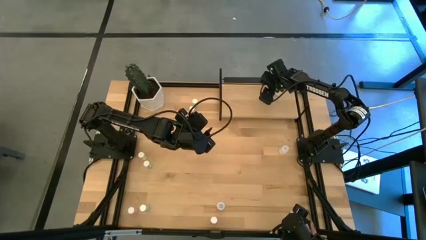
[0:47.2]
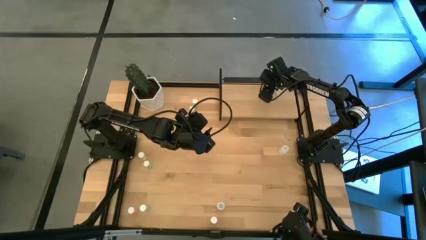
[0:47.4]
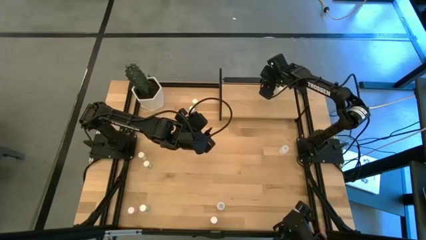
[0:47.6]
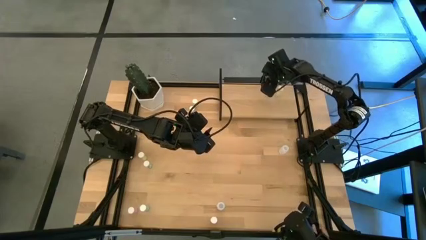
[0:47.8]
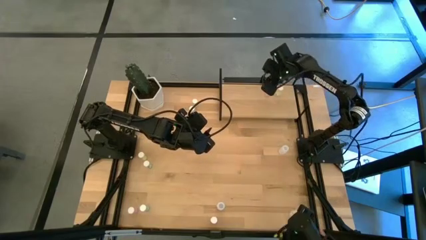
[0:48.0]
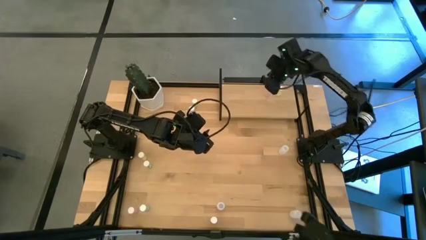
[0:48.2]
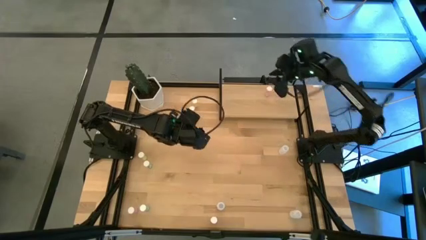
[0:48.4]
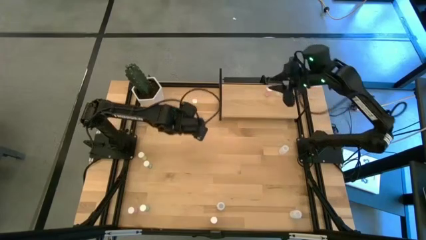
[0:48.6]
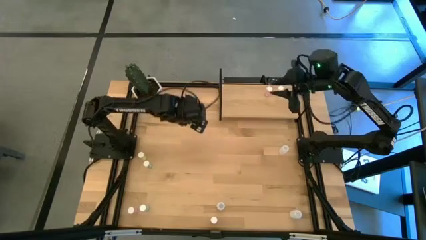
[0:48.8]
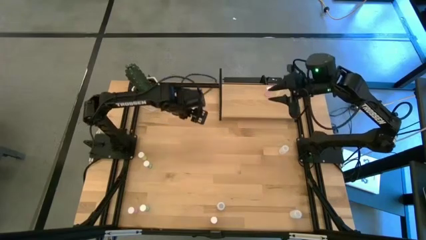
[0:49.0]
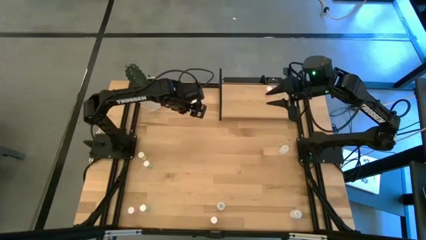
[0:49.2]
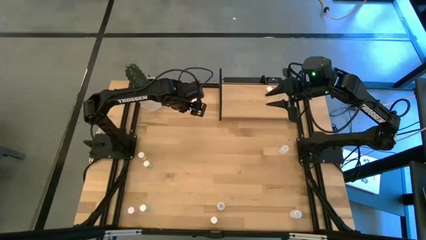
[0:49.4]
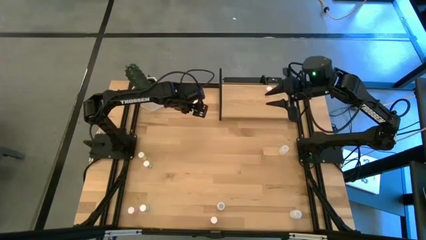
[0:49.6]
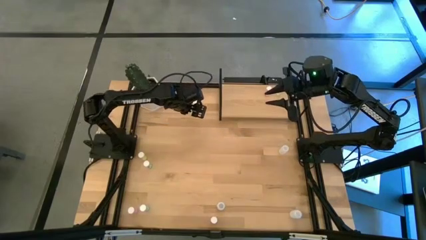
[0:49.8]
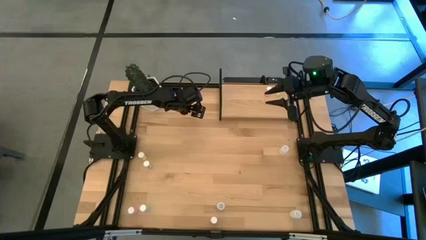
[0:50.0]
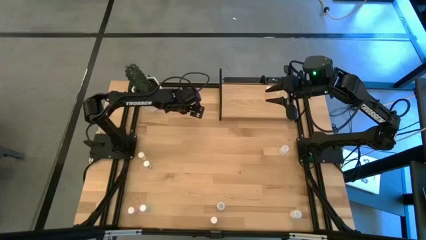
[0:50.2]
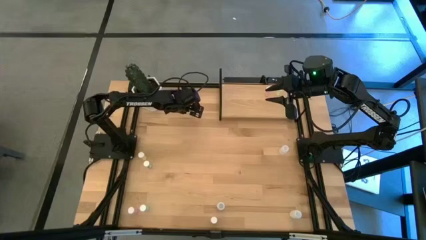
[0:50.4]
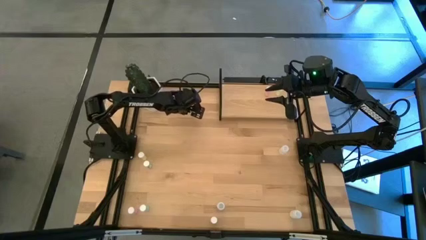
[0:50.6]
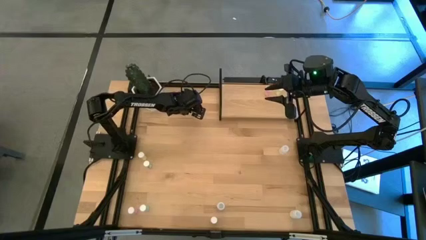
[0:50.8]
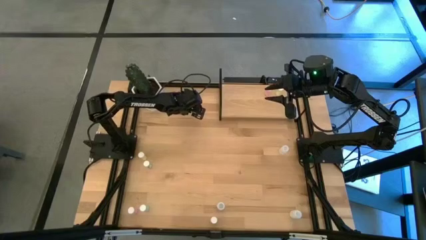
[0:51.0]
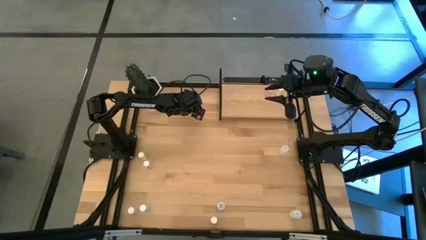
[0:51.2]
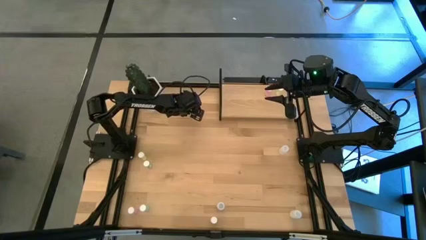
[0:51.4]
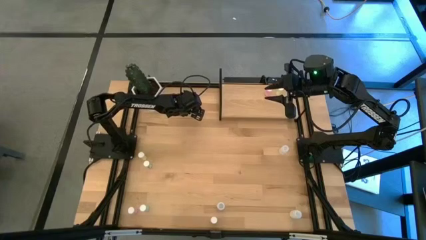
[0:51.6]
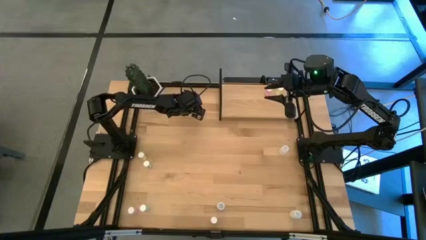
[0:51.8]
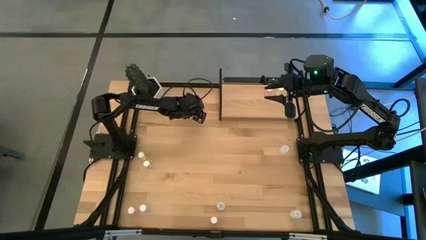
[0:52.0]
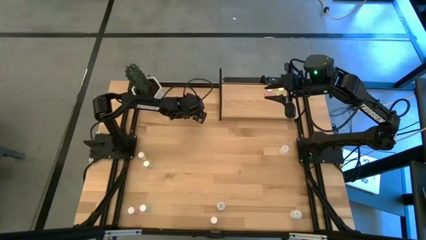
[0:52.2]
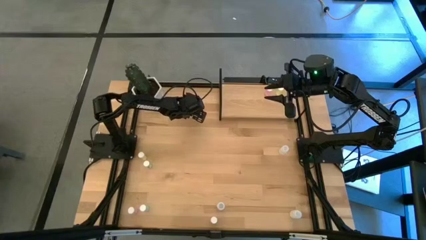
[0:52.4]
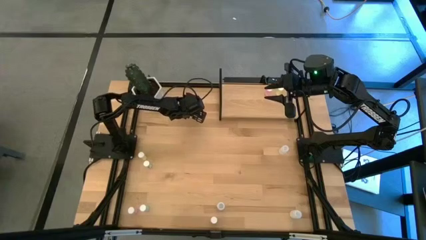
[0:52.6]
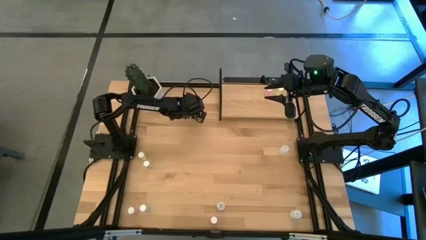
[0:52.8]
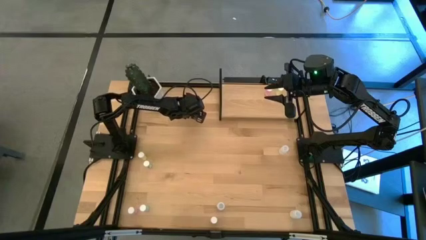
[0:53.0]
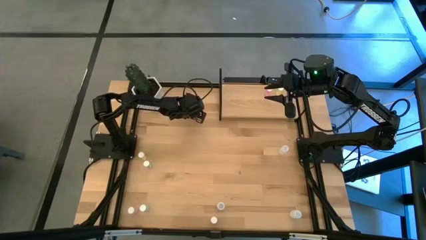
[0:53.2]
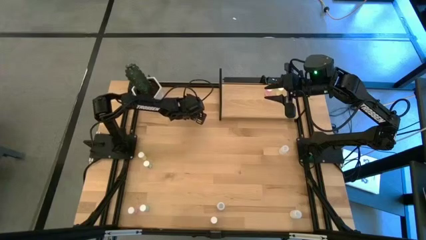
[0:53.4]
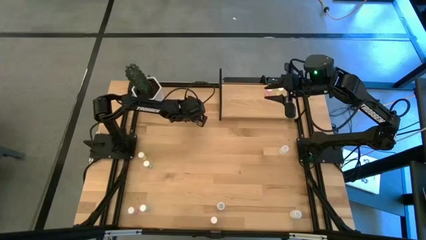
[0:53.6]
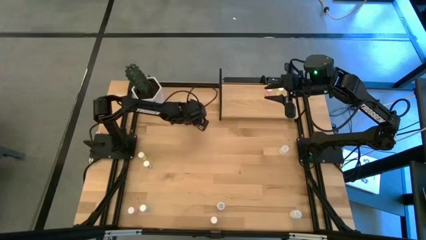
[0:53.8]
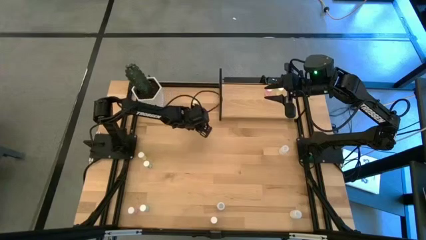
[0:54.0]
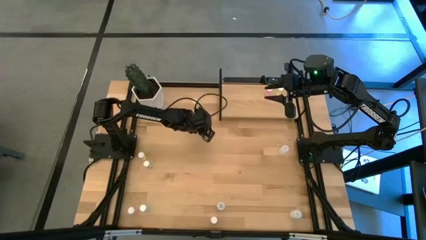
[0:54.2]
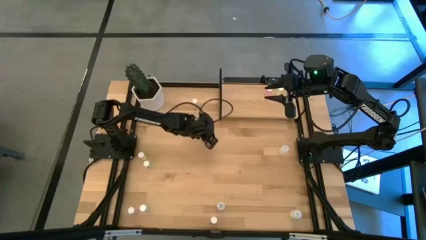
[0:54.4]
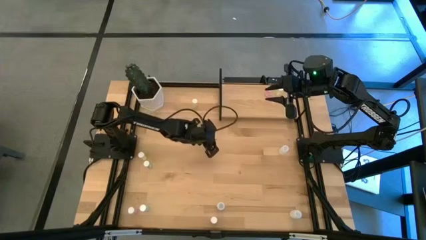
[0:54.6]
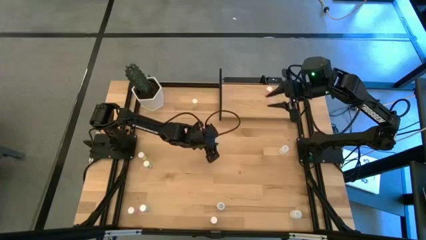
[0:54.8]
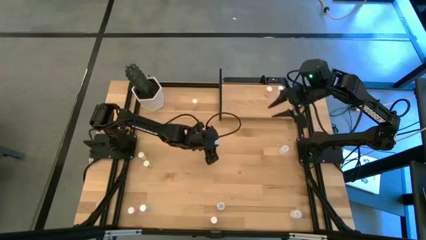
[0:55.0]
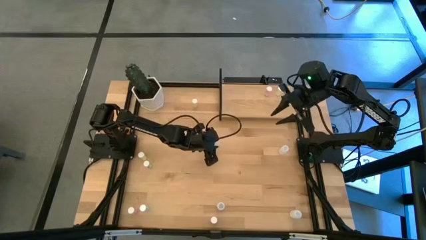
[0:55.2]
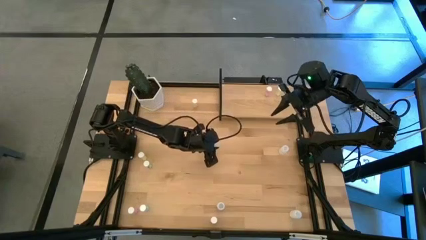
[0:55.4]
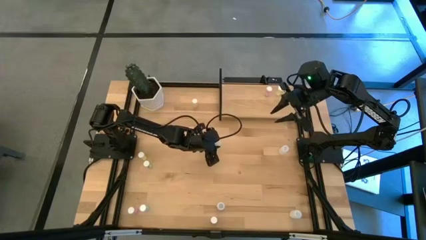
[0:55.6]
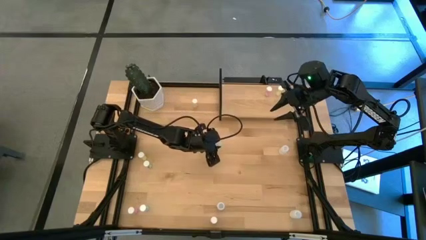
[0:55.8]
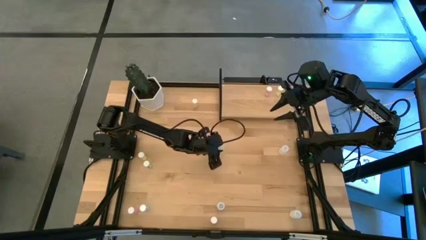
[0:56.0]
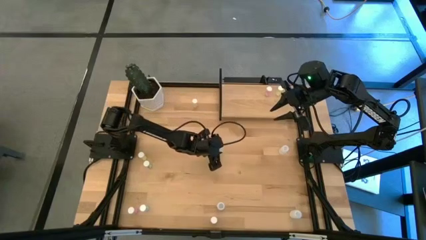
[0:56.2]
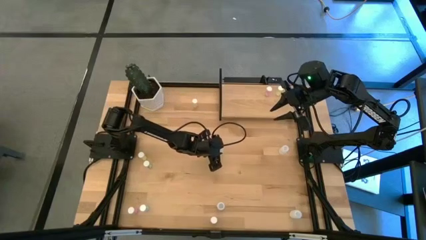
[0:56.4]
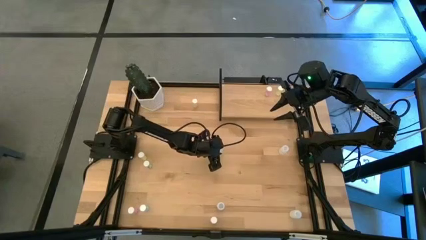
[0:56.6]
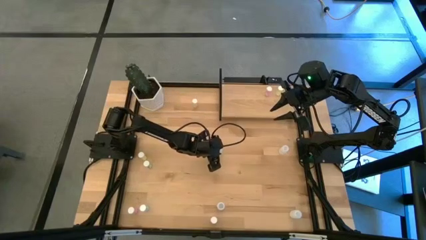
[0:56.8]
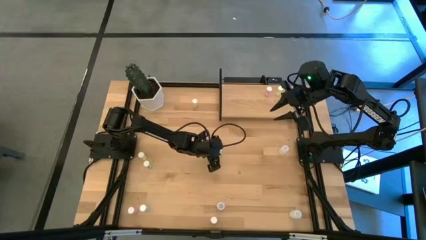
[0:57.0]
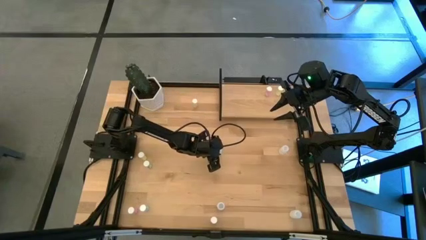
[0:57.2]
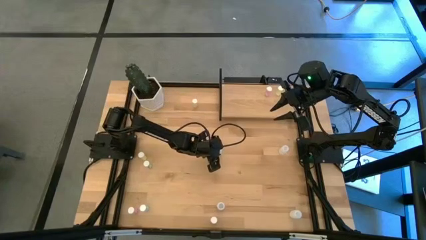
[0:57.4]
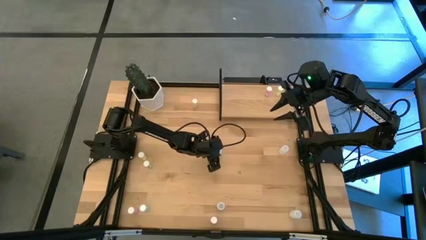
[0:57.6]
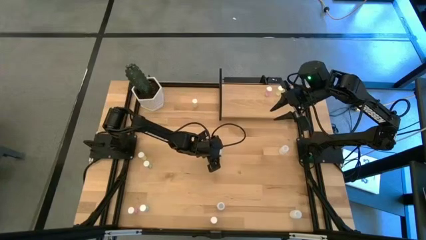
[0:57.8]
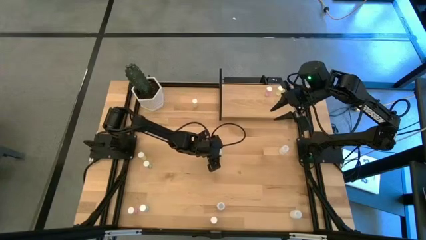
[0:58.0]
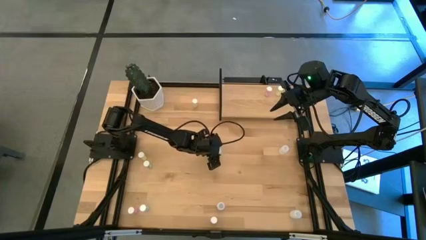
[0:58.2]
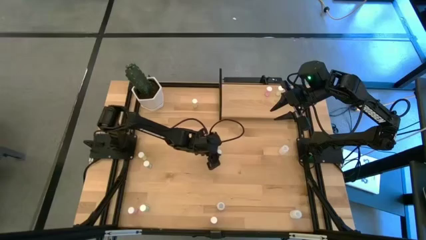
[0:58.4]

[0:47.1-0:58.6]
Task: Pick and place medicine bottles onto shelf by color
Put the top green pill bottle on the shelf

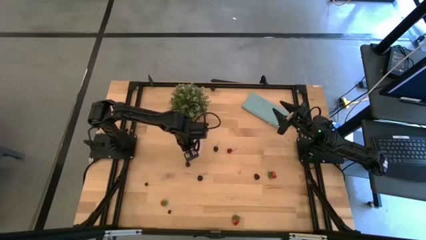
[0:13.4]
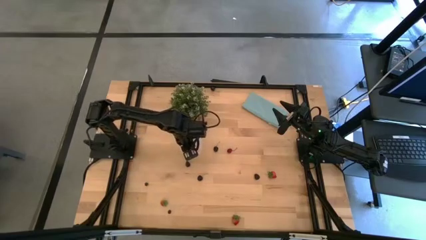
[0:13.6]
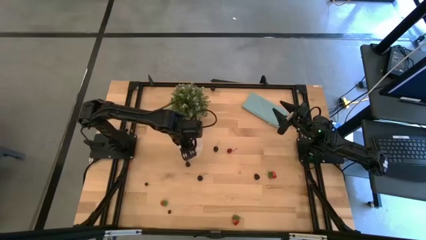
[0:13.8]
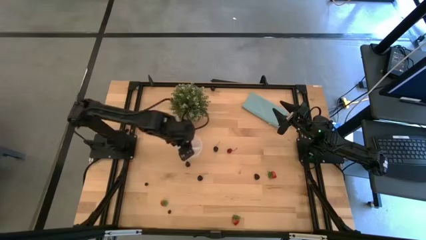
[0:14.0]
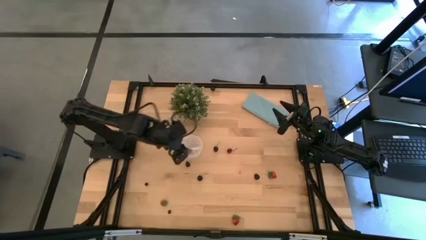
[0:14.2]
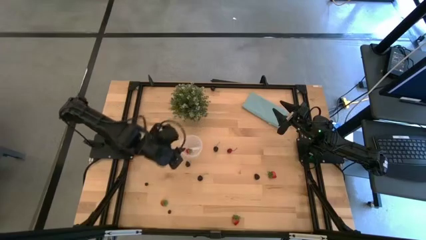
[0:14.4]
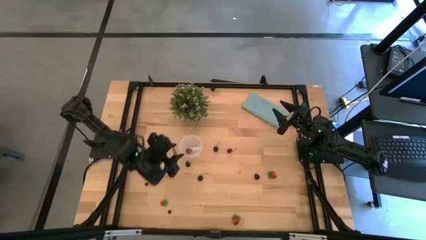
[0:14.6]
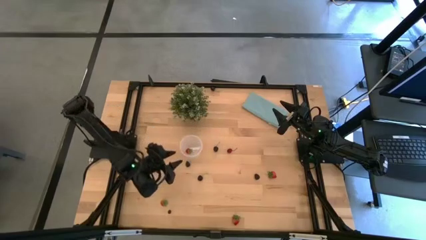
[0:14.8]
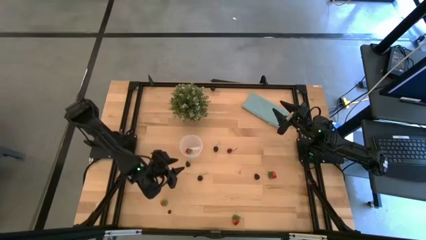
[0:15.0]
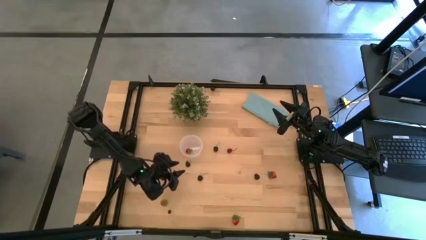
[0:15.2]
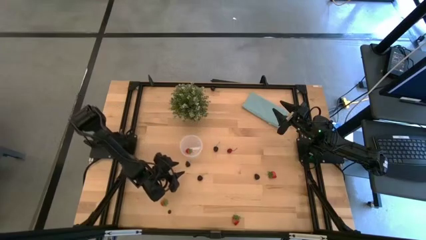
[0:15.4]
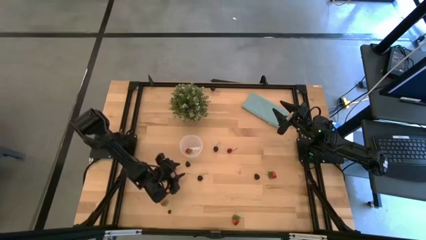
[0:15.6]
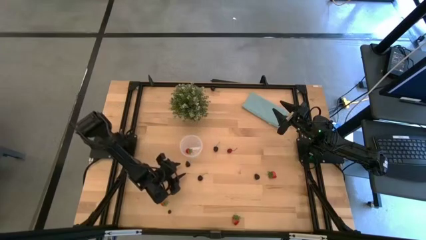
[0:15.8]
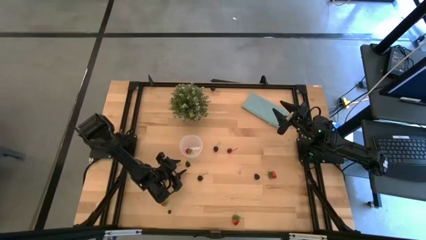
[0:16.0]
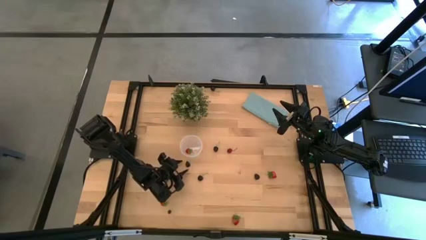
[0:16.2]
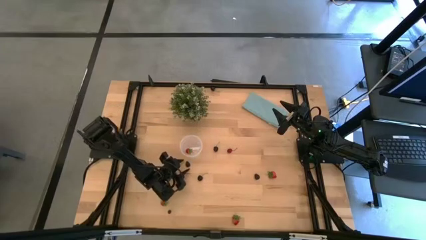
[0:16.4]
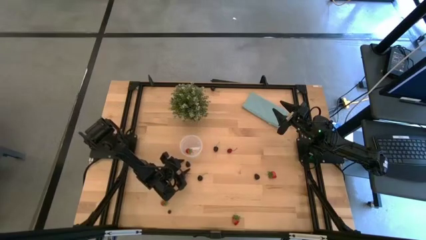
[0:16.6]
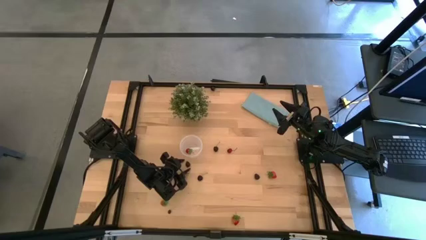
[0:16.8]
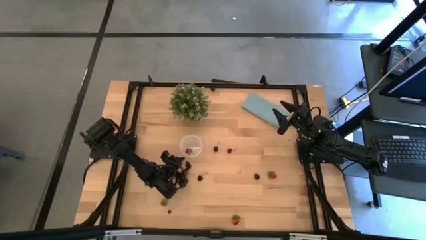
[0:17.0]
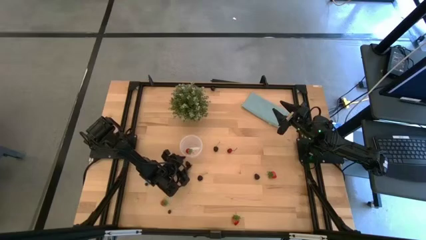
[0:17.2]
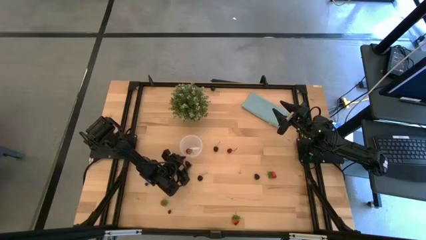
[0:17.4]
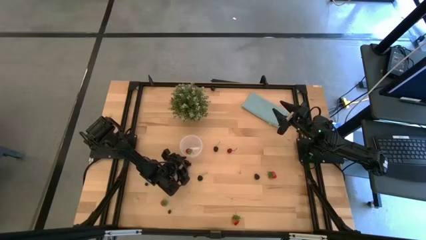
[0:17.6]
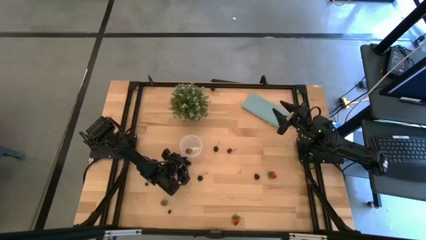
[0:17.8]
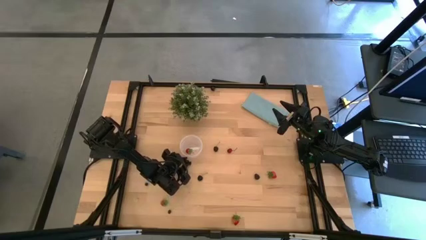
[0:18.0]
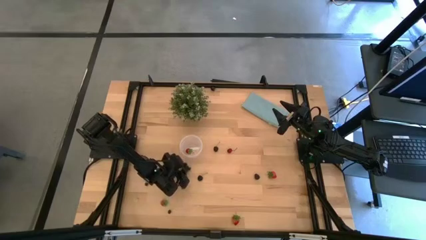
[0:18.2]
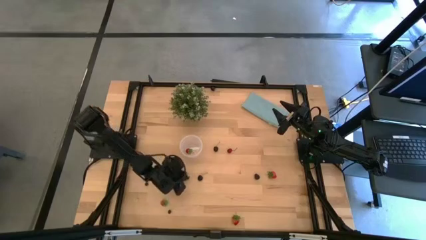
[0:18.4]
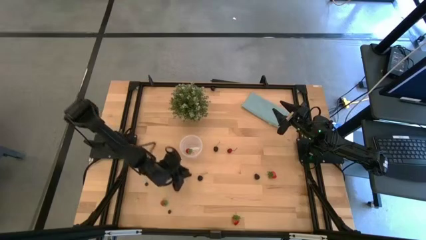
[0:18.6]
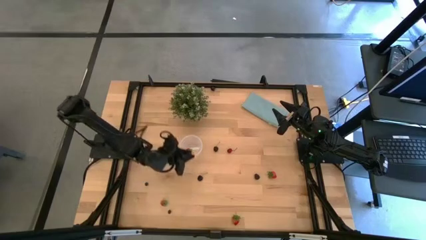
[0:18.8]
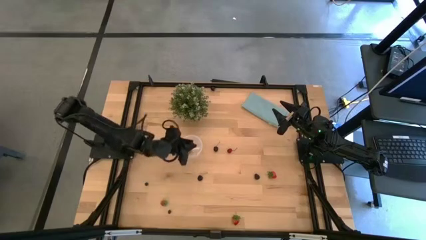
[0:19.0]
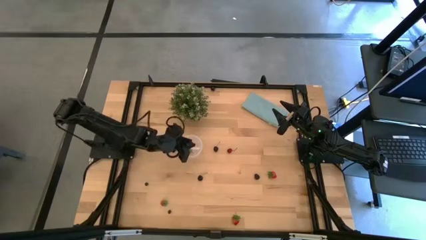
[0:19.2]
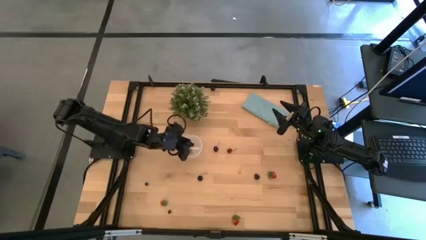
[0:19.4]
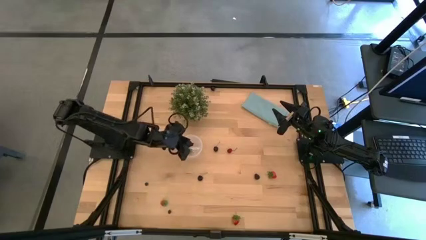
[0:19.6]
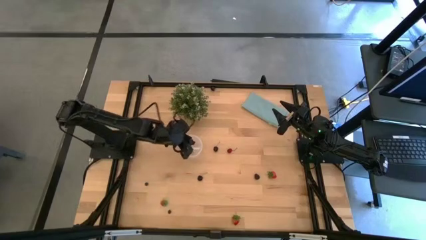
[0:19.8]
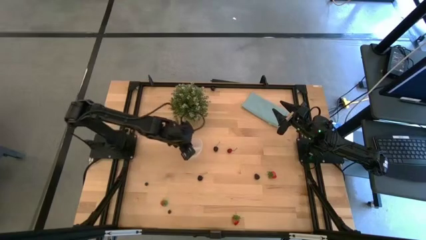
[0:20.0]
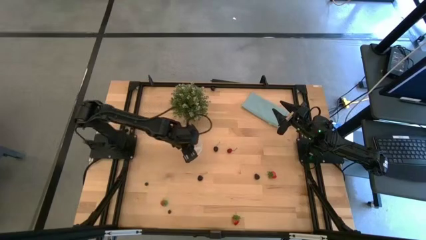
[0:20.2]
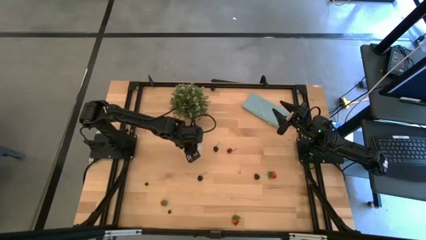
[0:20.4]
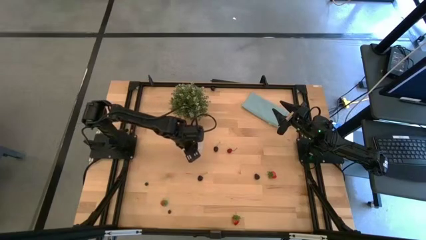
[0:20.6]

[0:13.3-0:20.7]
Task: Pick and placing Produce into tupperware
Put the blackberry into the transparent container
